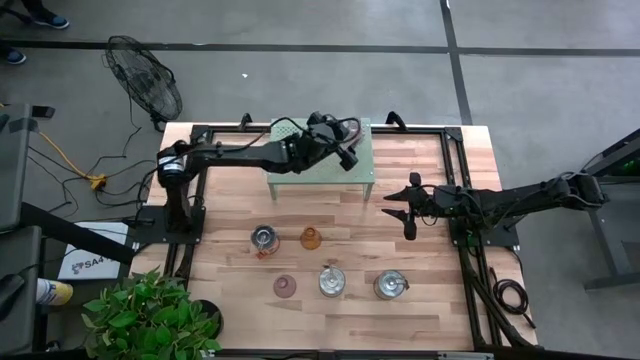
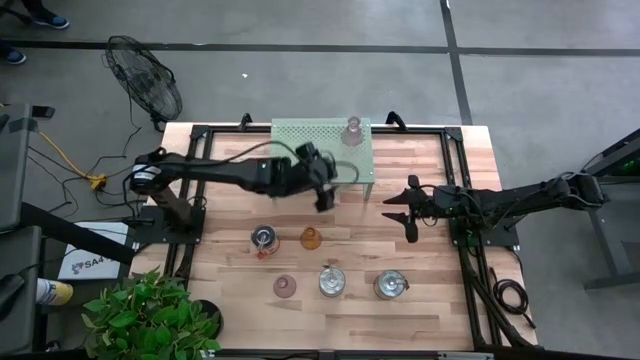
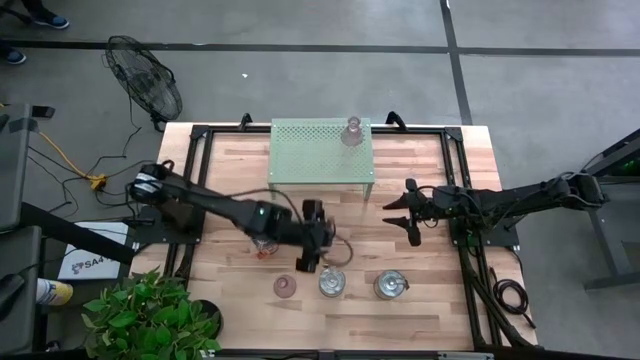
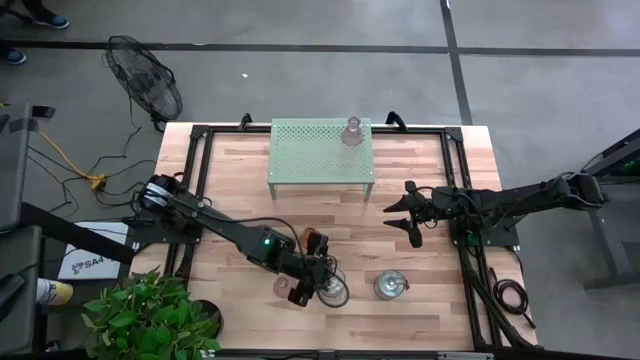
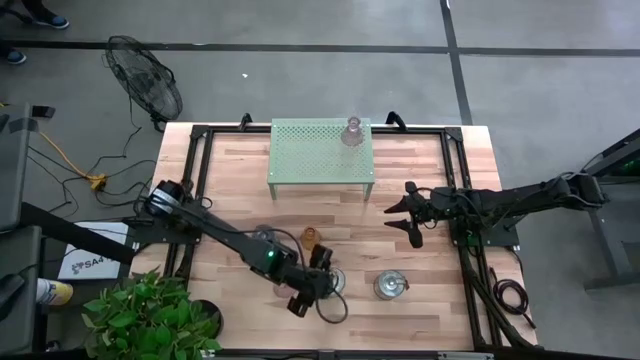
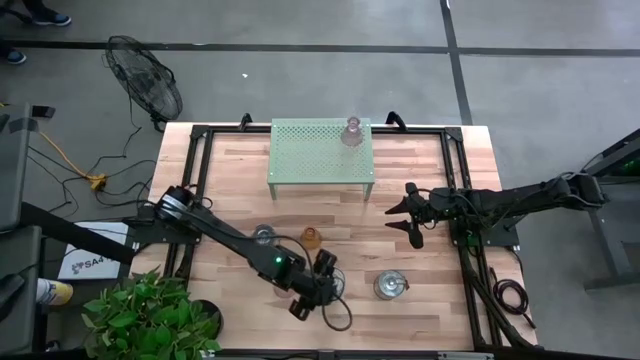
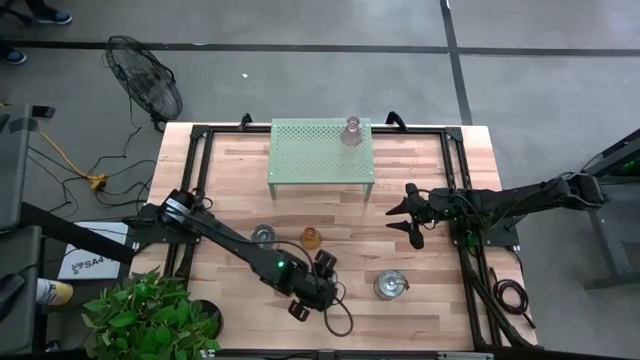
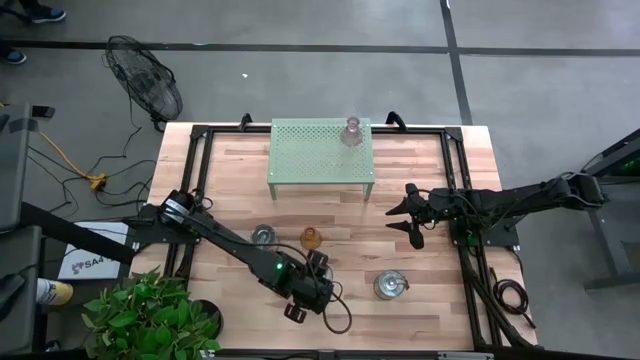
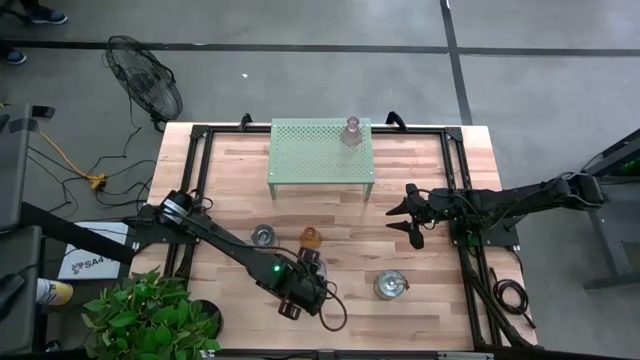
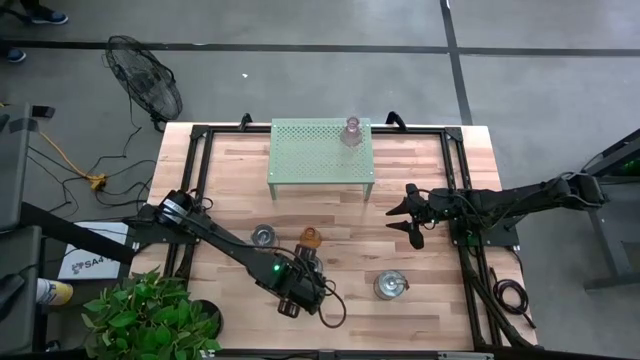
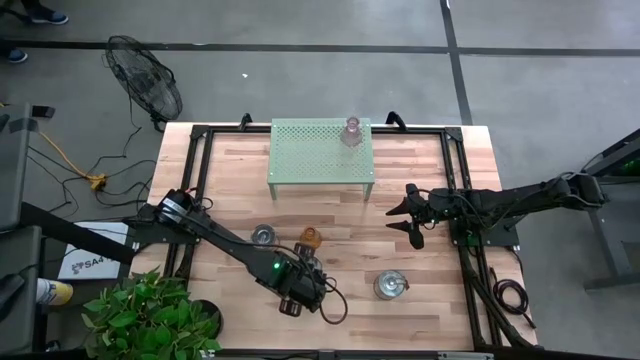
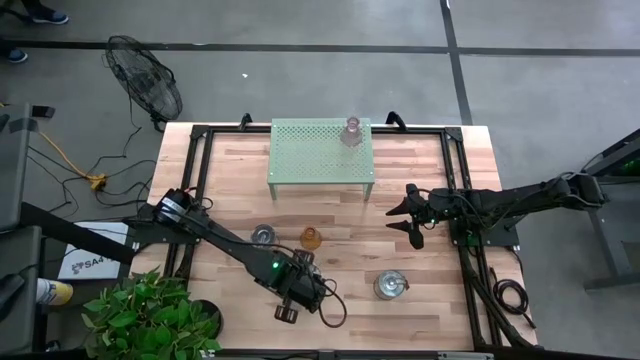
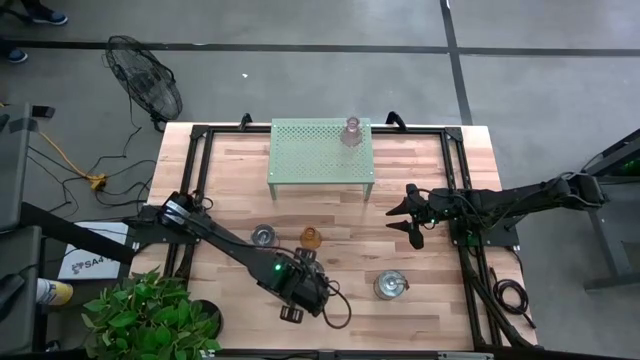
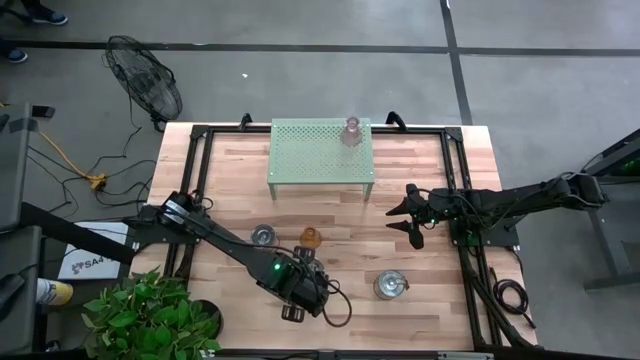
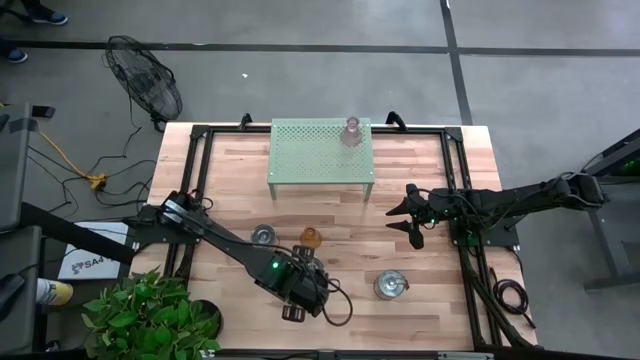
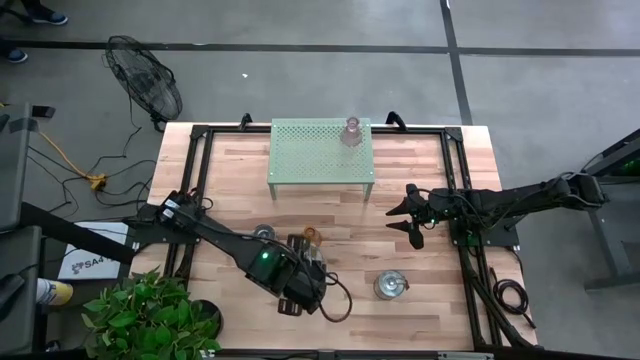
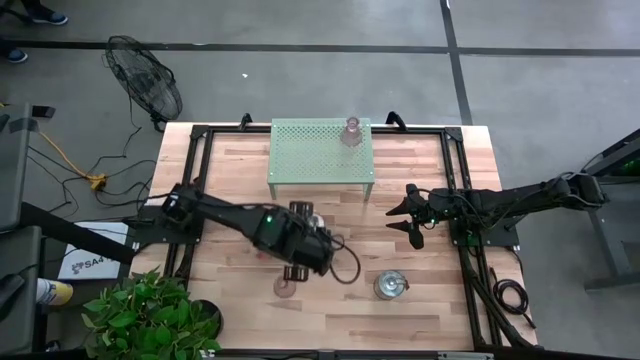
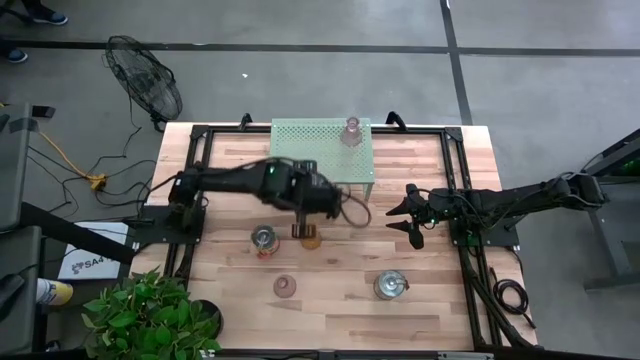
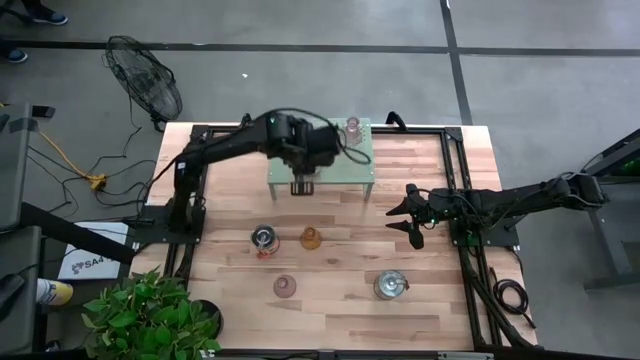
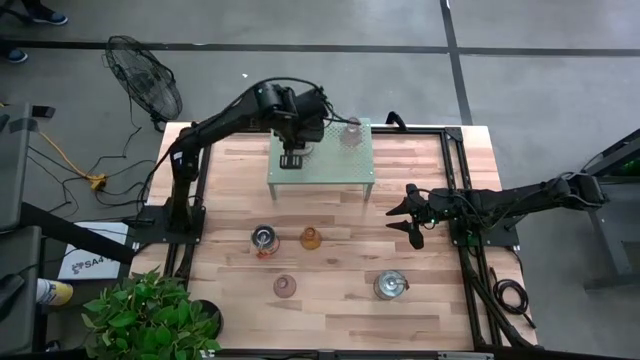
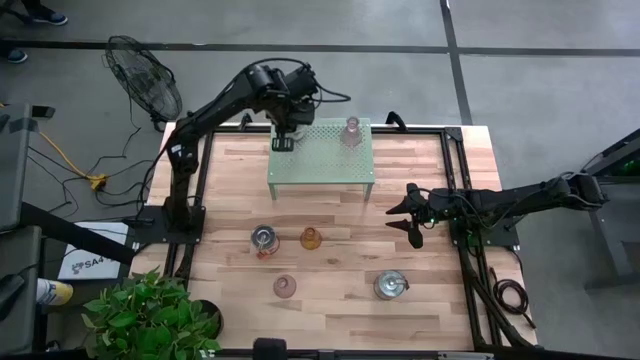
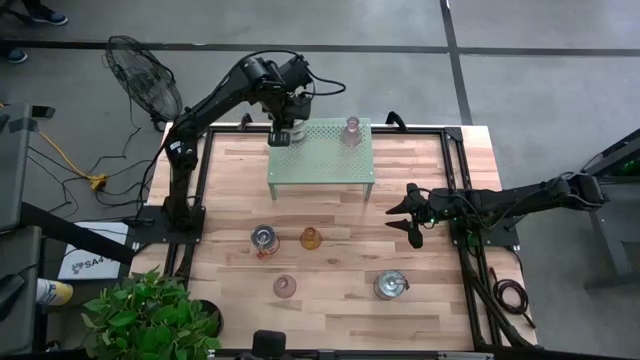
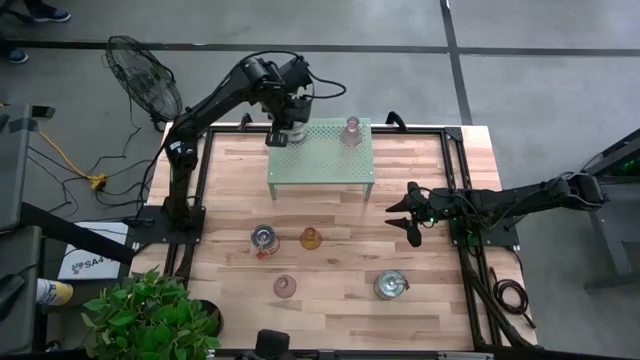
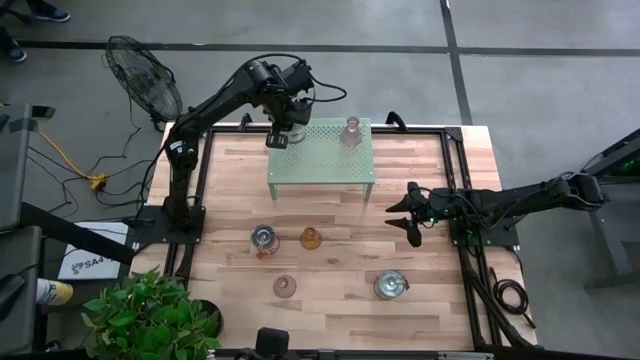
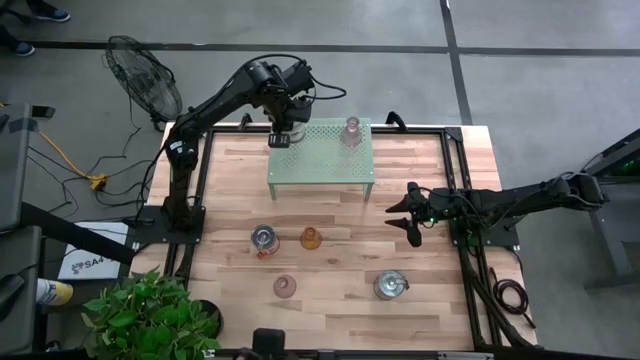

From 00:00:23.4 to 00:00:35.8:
Task: Pick & Place candle stick holders
Put the bottom left silver scented candle on the shelf

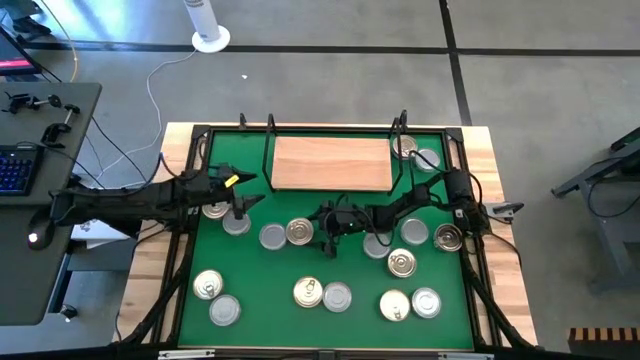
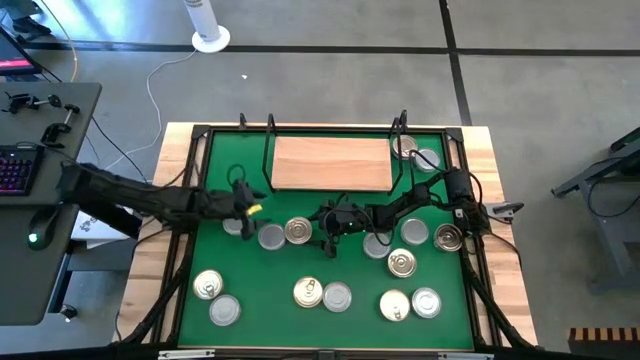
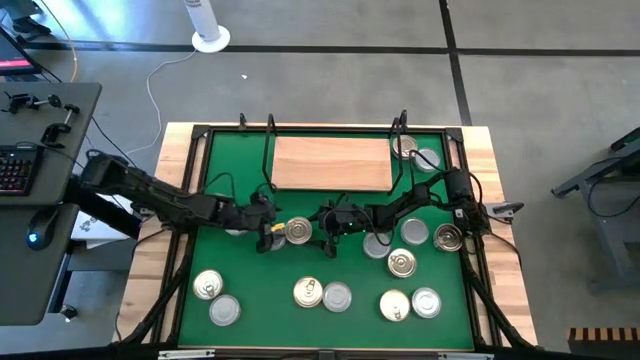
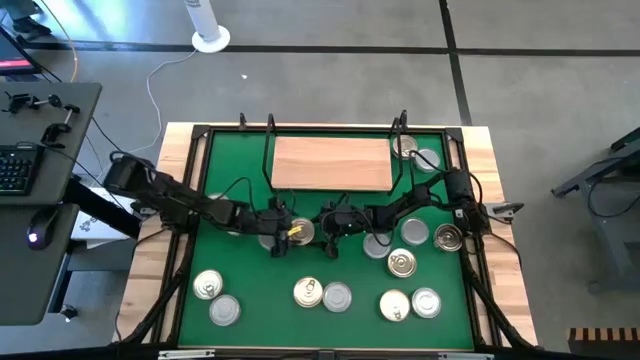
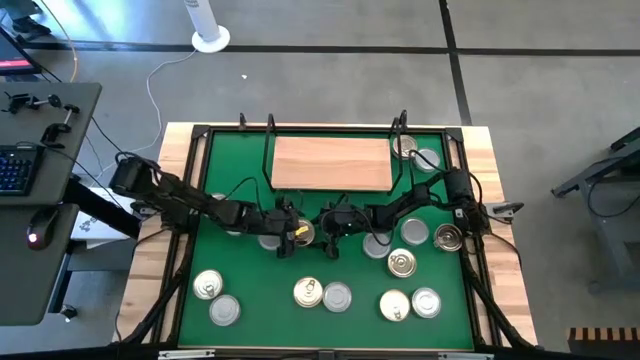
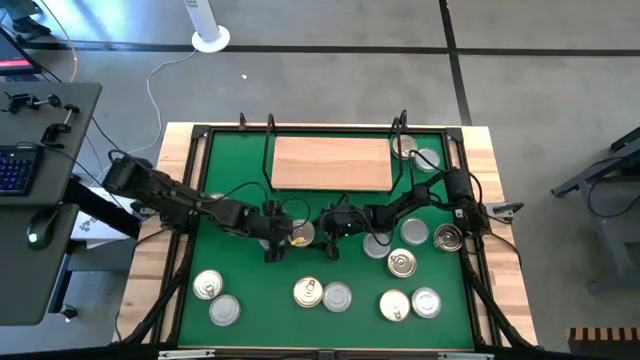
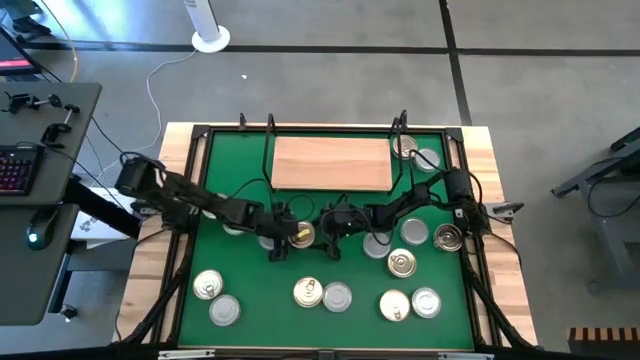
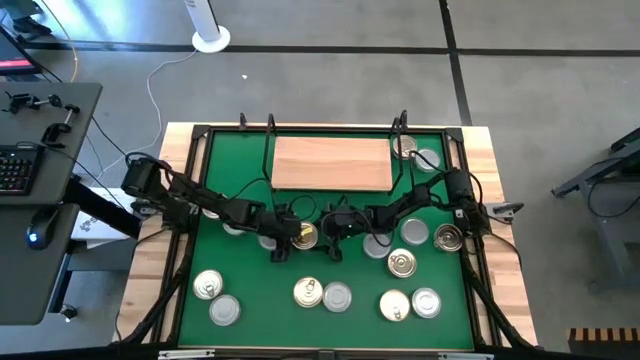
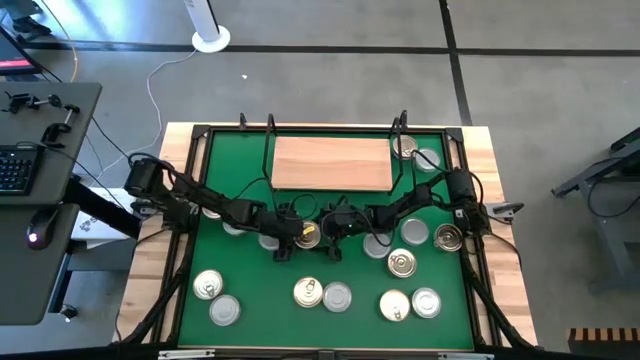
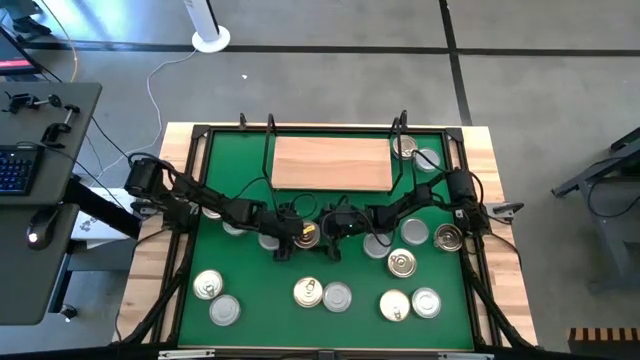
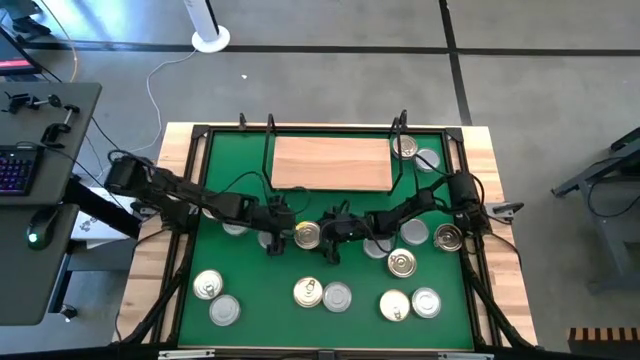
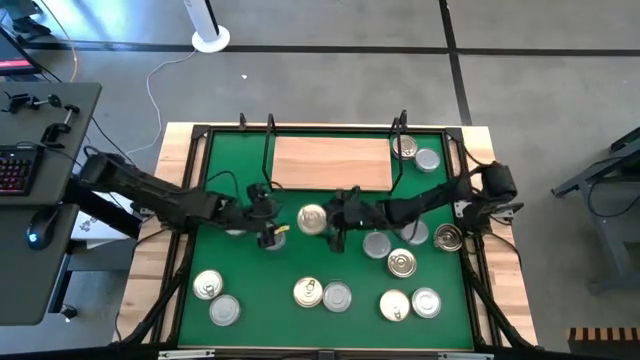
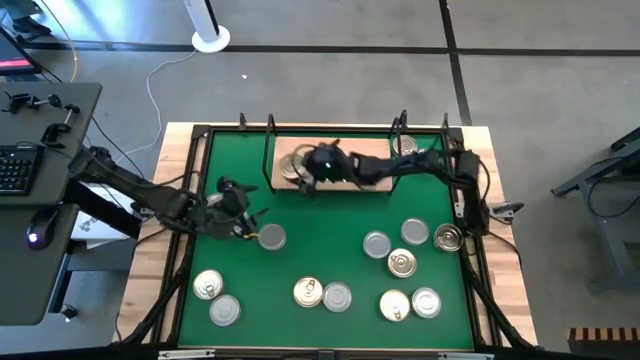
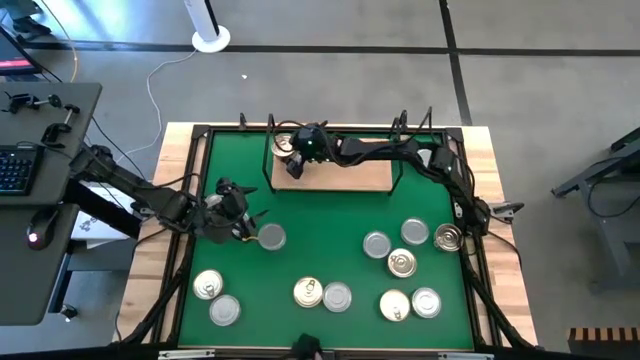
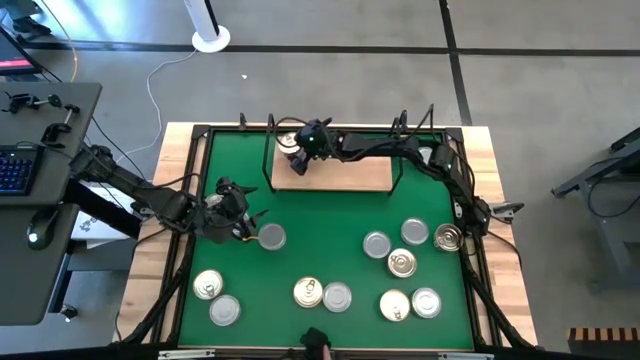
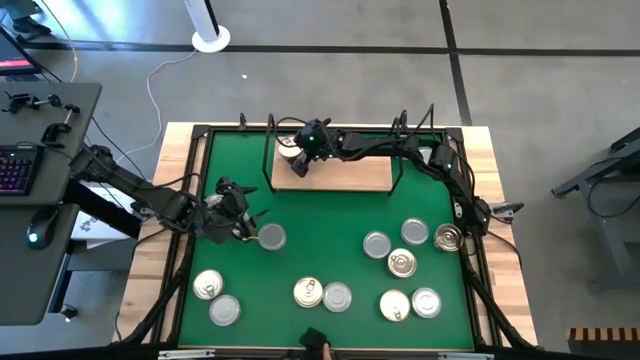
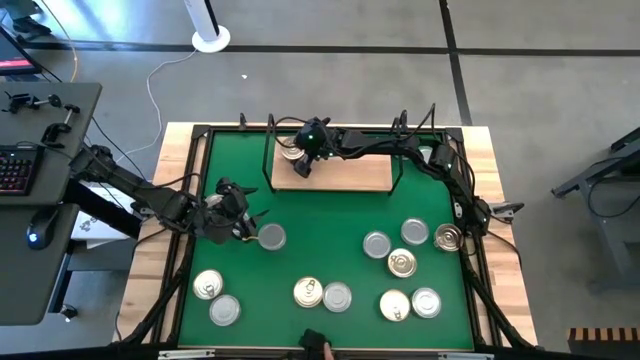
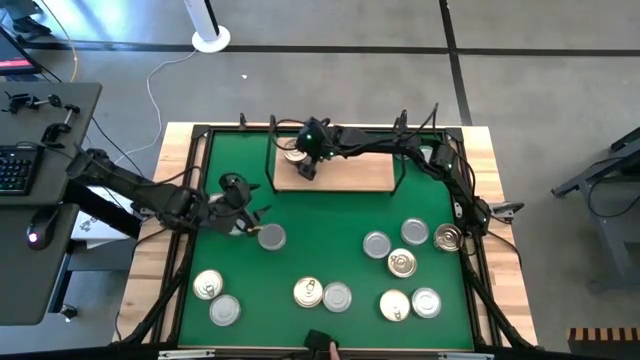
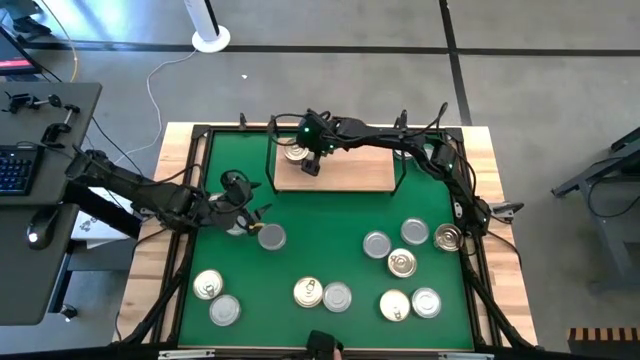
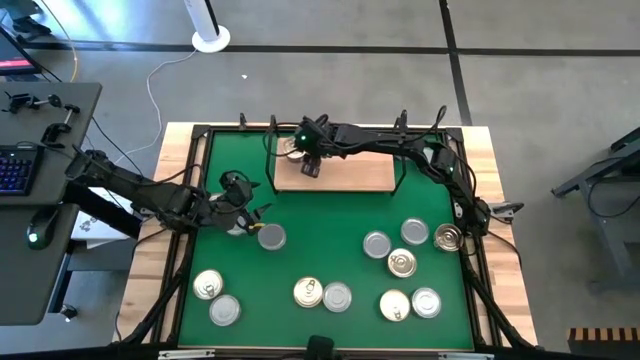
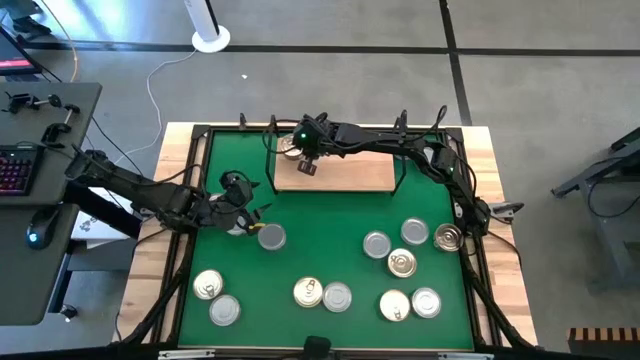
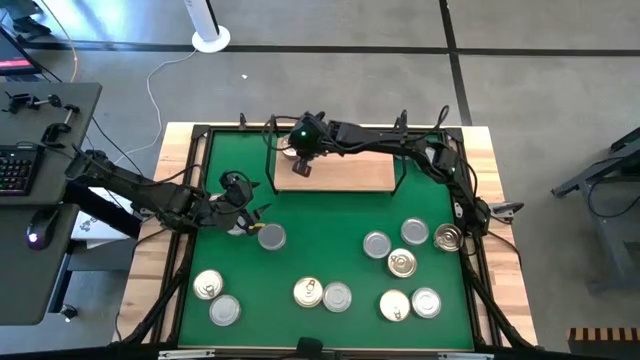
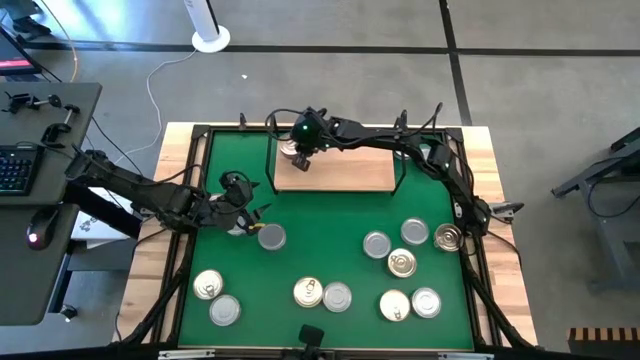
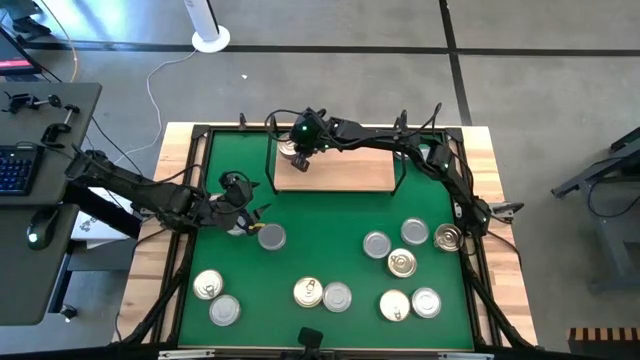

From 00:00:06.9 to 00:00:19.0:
Task: Stack canned seafood by type on shelf
Put the blue/pink tuna can on the shelf
